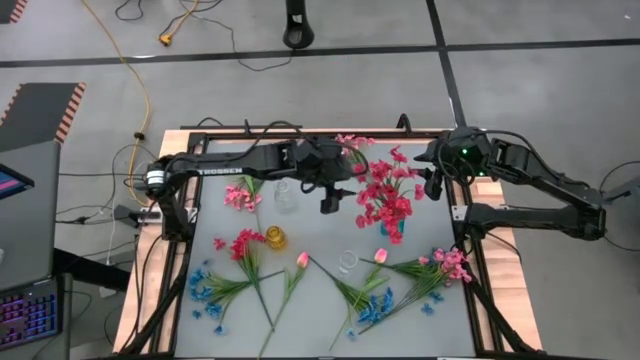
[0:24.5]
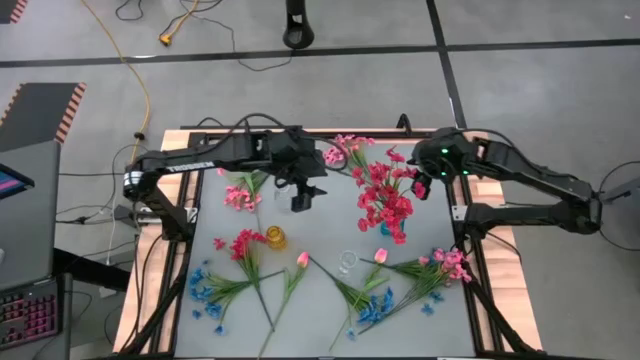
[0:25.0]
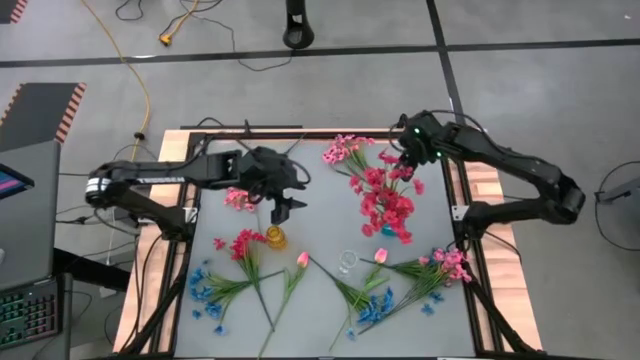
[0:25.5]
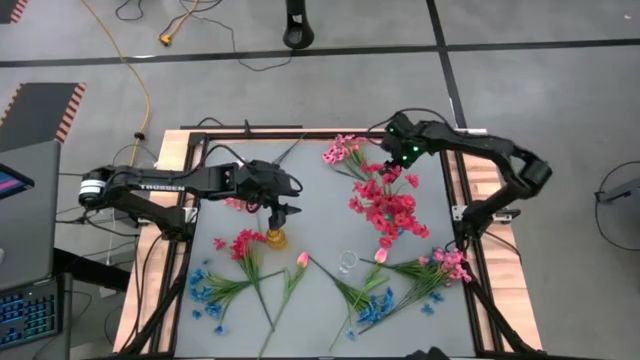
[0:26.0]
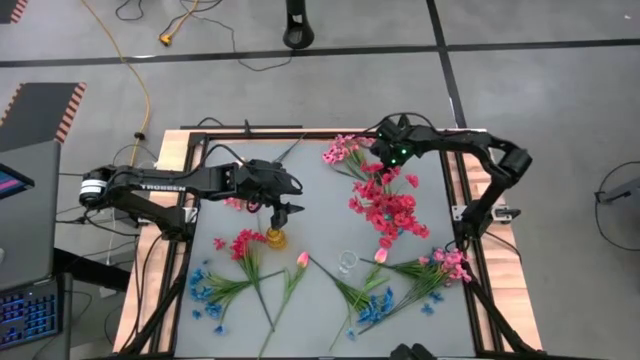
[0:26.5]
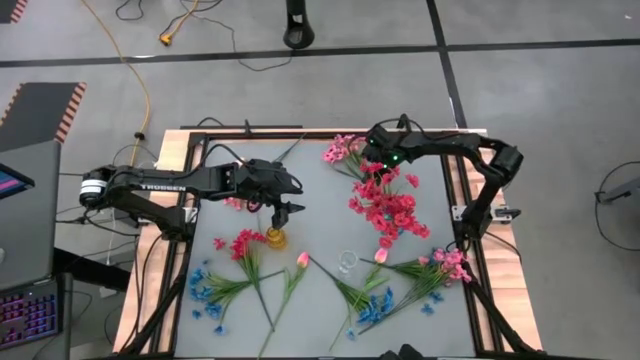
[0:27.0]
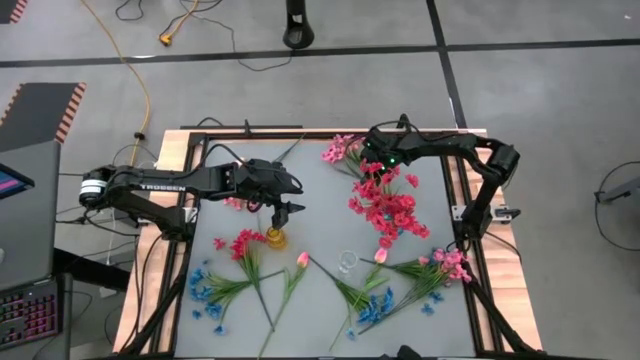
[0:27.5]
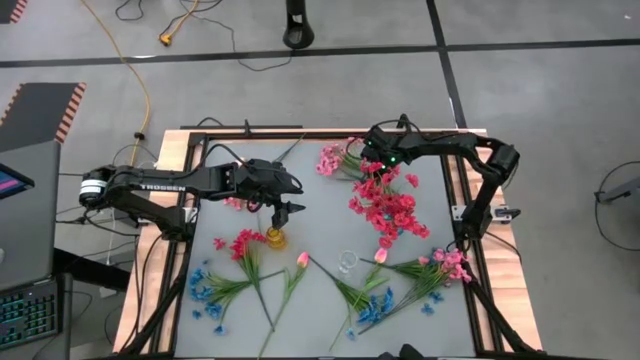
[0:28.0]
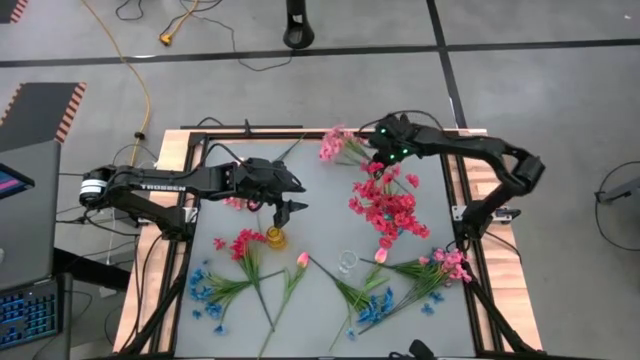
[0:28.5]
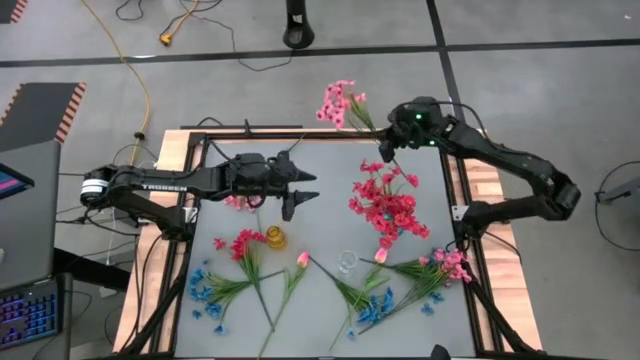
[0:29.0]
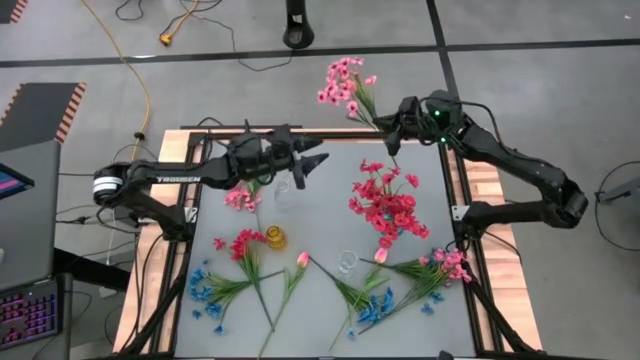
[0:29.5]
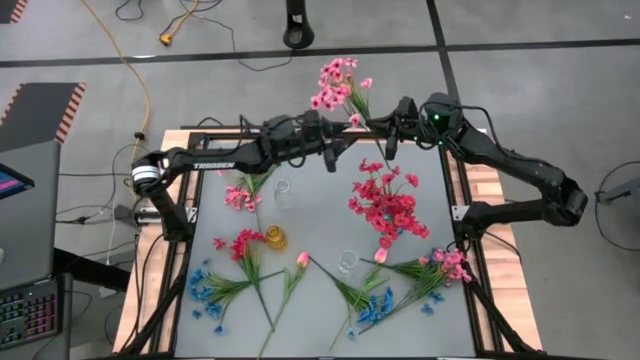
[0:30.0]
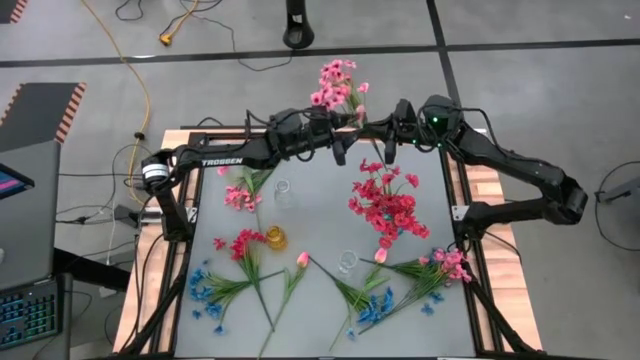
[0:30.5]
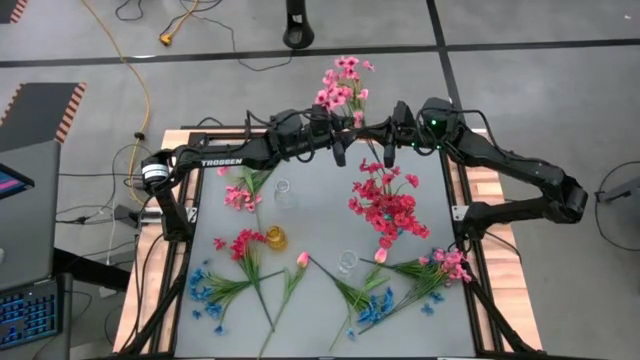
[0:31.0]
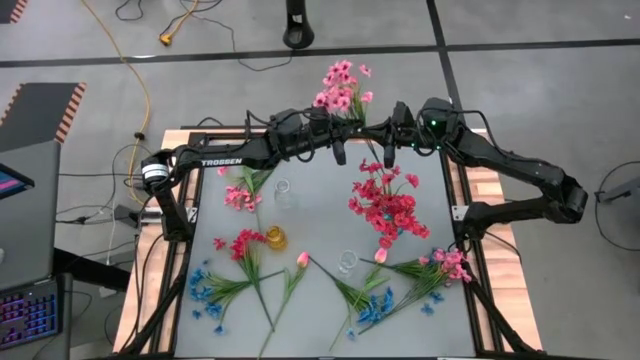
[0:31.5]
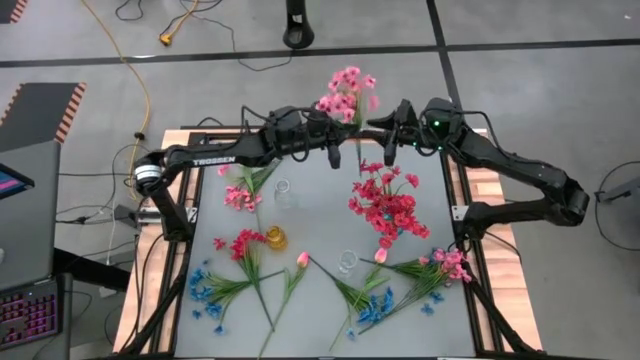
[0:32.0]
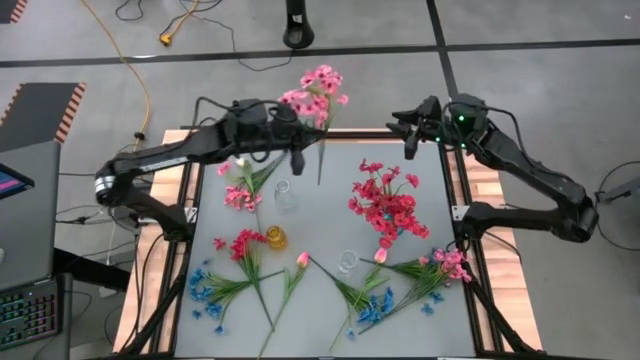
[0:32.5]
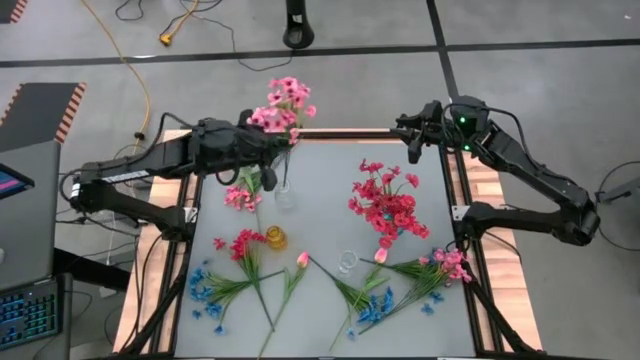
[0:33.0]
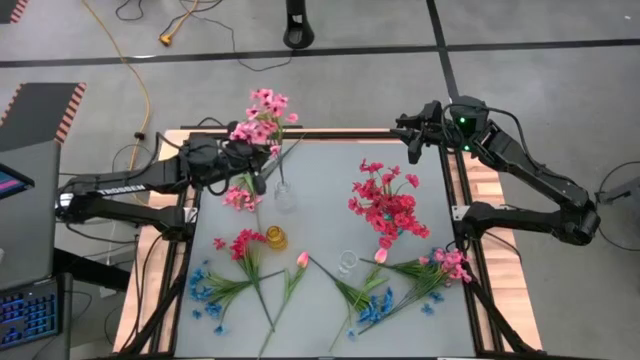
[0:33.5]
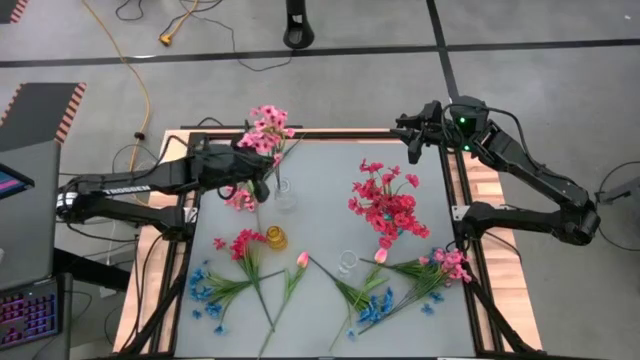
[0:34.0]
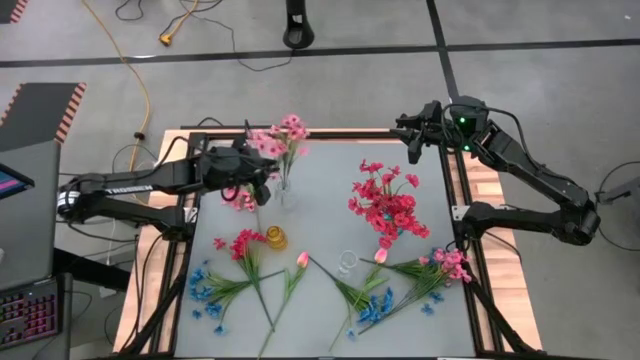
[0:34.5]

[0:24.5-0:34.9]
Task: Sort flowers into vase by color
Put the top right pink flowers into the top transparent vase

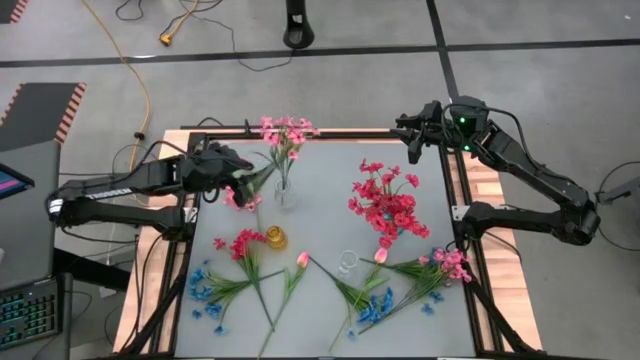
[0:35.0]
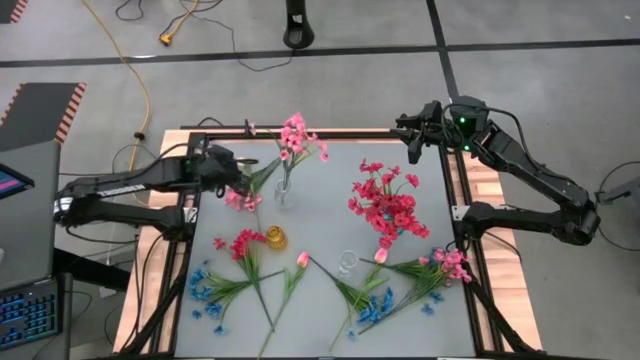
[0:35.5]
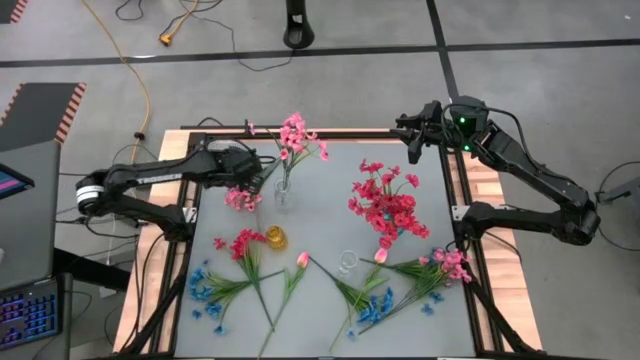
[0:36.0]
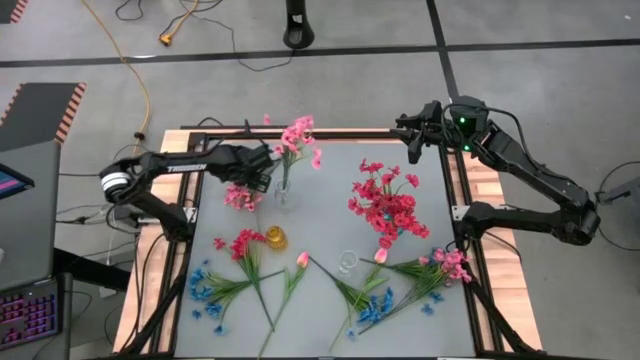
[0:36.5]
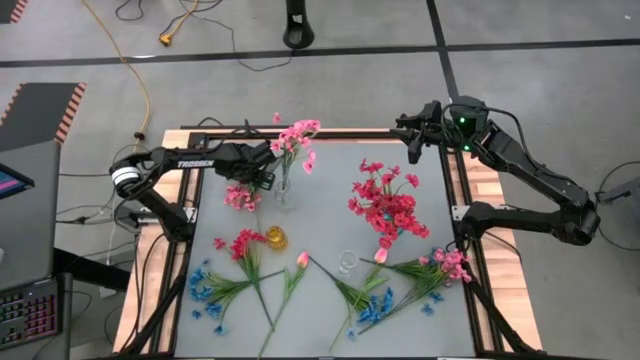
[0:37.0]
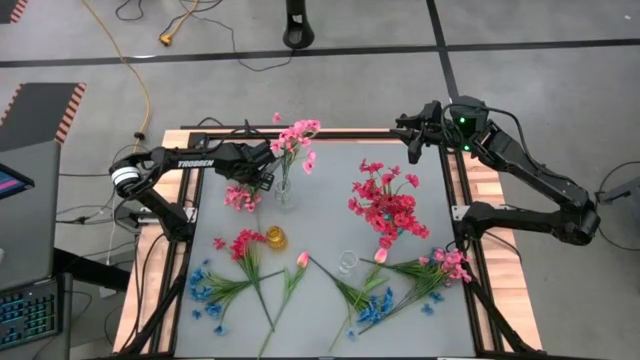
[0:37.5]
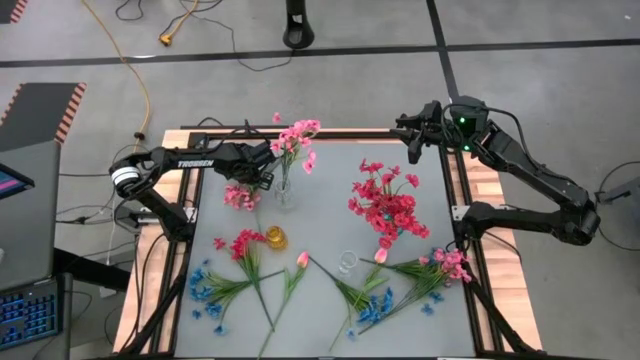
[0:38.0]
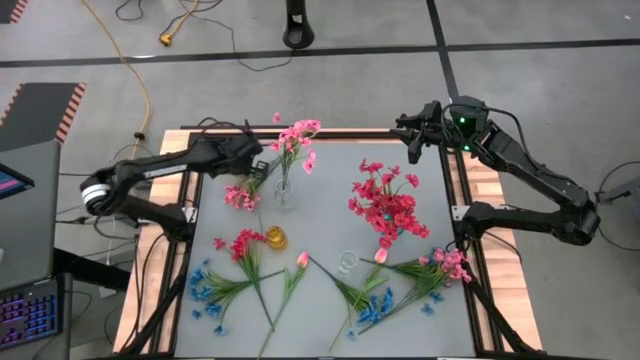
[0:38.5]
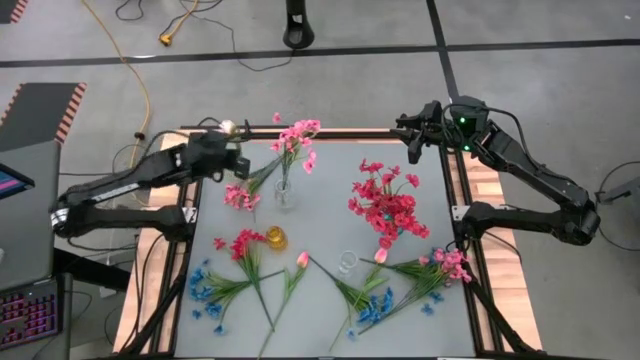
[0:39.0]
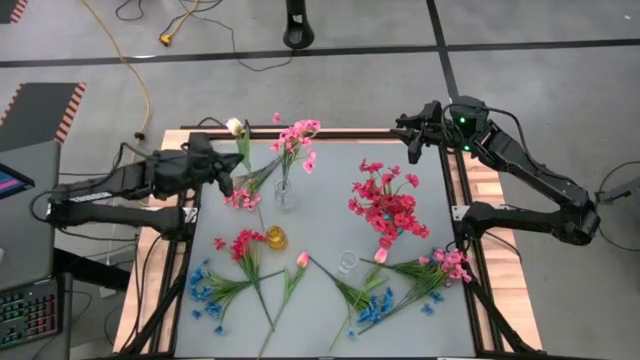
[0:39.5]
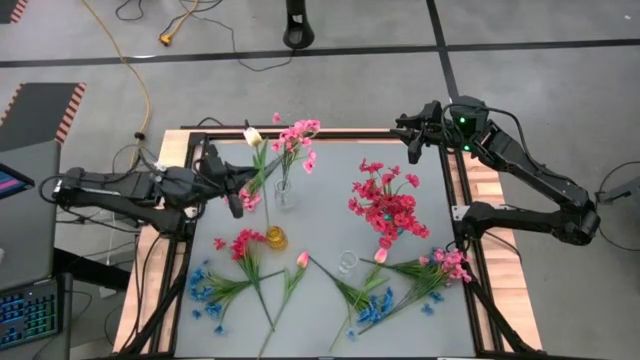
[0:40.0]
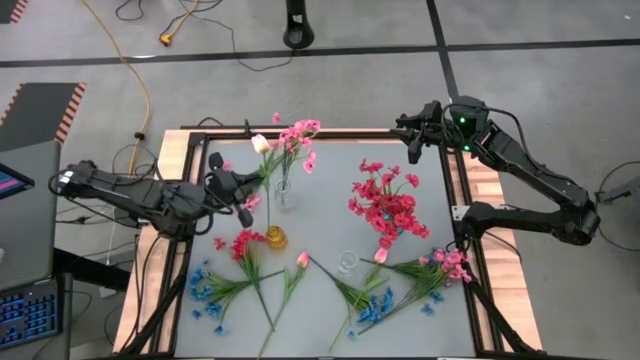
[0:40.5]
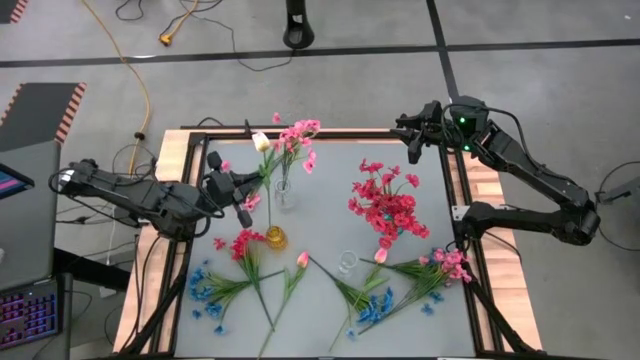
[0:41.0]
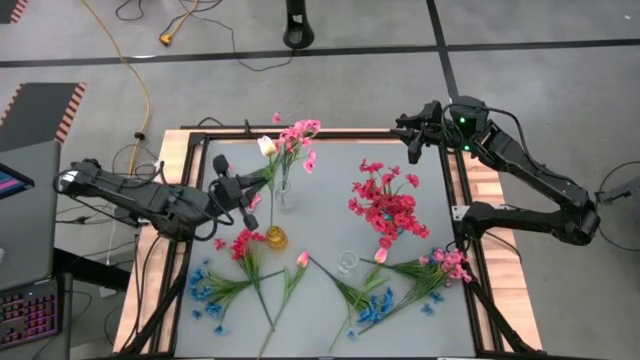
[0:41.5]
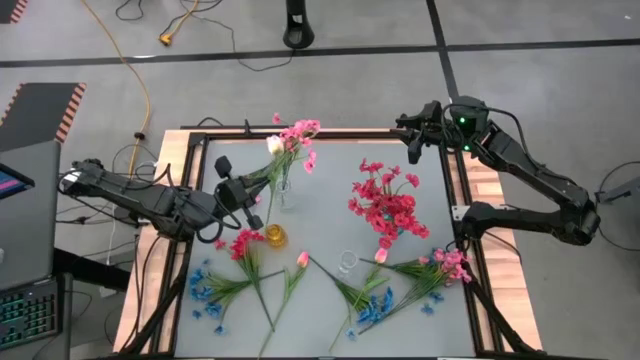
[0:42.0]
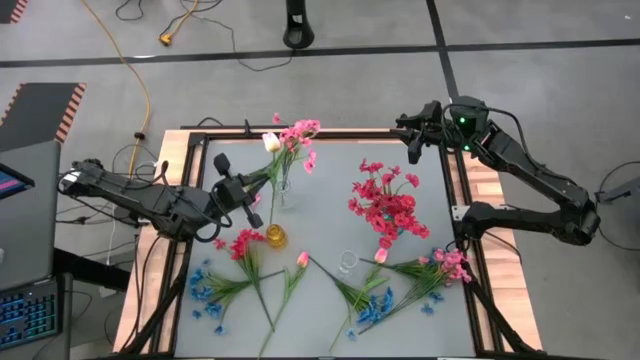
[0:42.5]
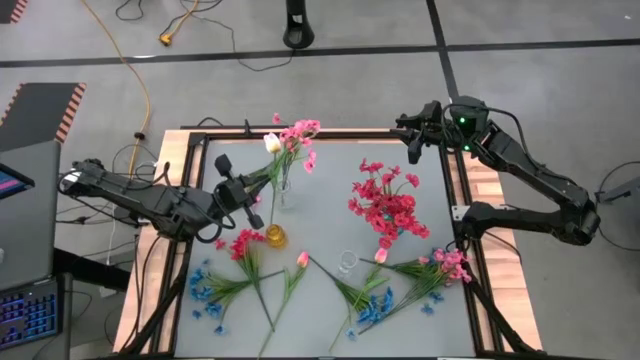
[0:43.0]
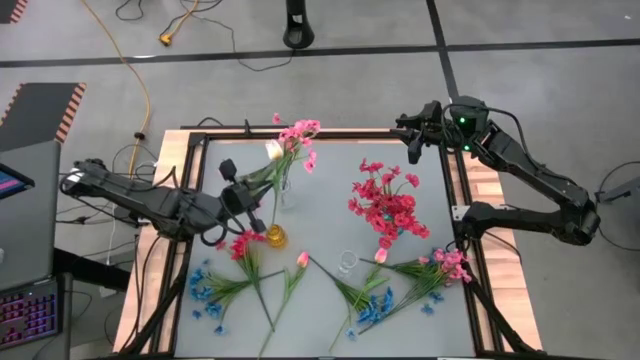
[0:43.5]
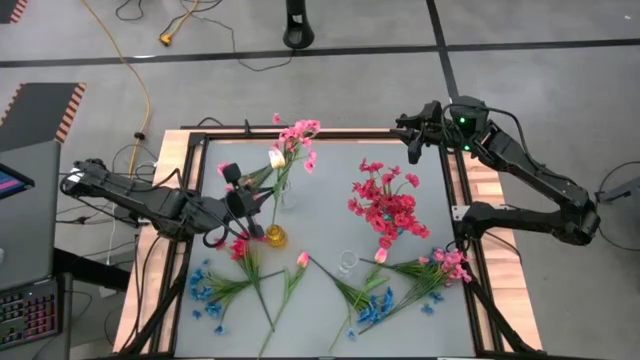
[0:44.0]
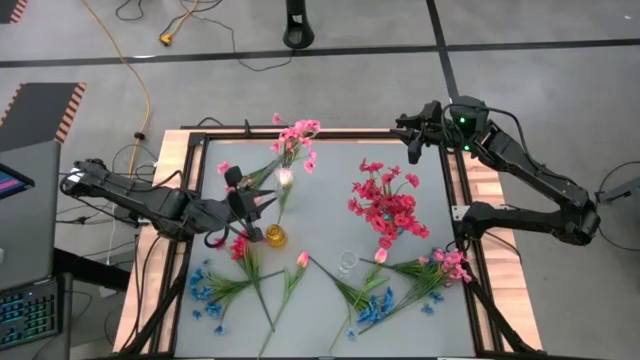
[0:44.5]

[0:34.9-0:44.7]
Put the top left pink tulip into the yellow vase

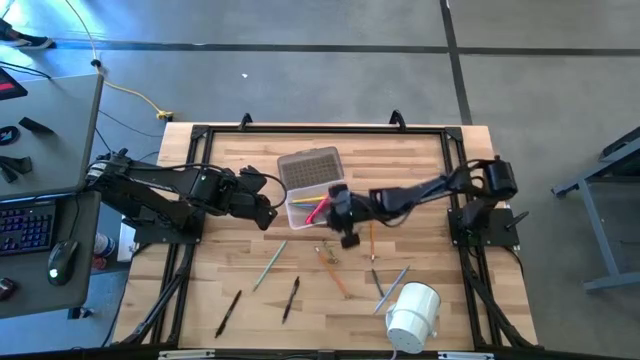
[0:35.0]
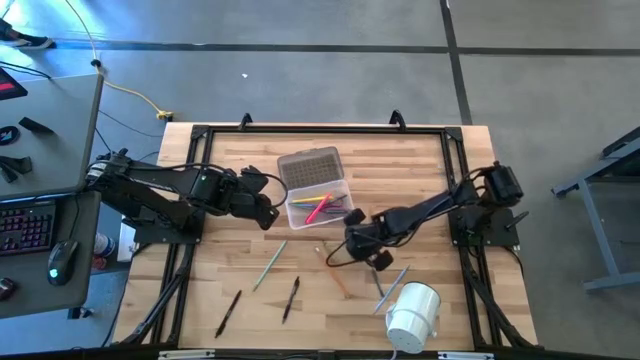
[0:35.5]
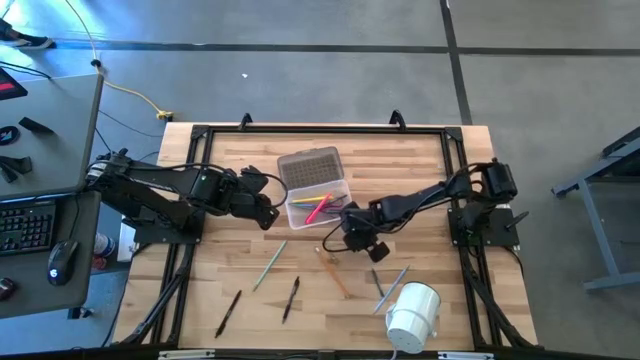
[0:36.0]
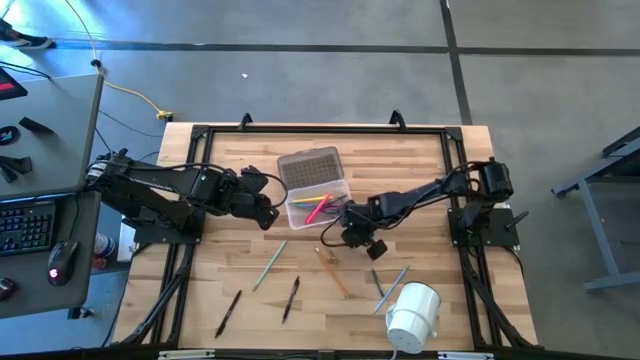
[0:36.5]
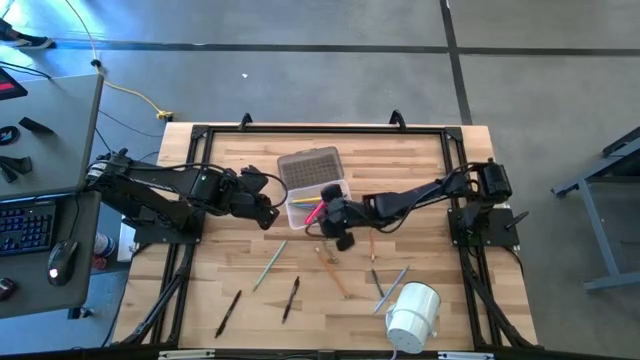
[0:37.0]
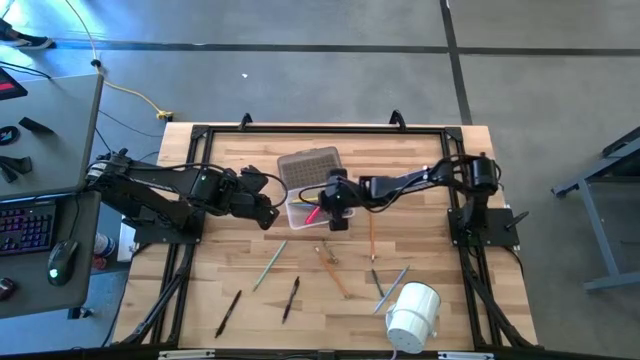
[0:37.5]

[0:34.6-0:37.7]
Task: Pick & place school supplies into a supply box
Put the right light green crayon into the supply box
